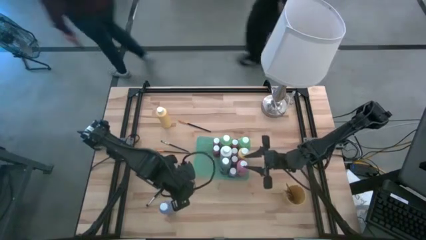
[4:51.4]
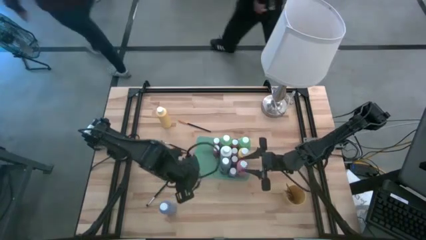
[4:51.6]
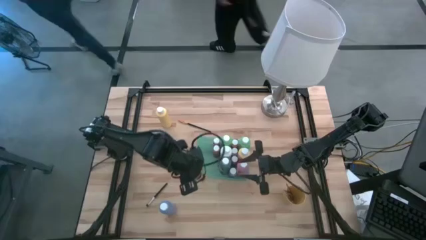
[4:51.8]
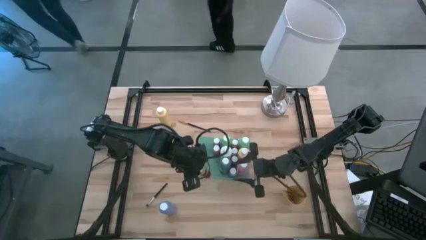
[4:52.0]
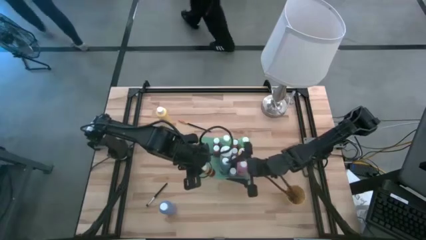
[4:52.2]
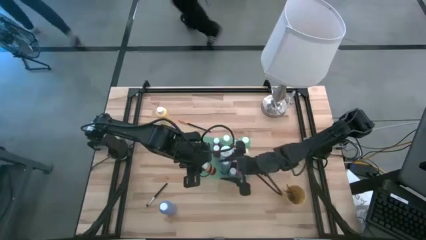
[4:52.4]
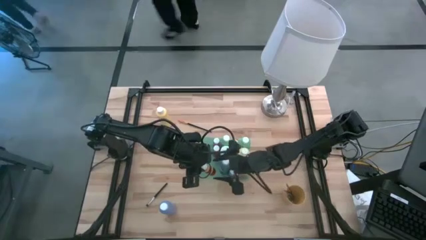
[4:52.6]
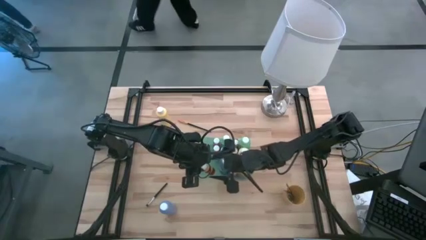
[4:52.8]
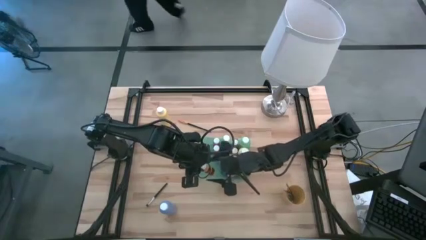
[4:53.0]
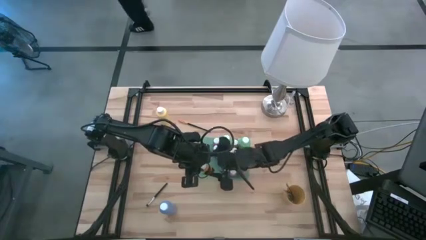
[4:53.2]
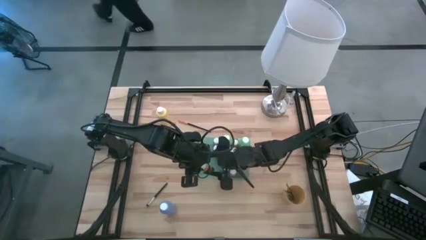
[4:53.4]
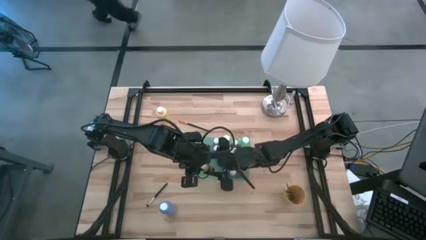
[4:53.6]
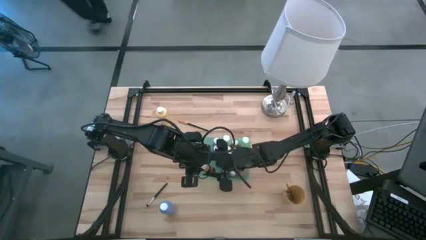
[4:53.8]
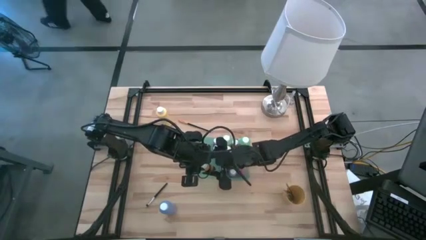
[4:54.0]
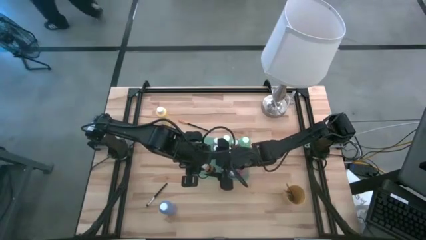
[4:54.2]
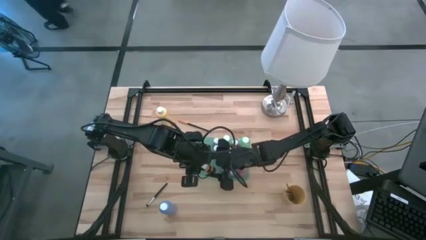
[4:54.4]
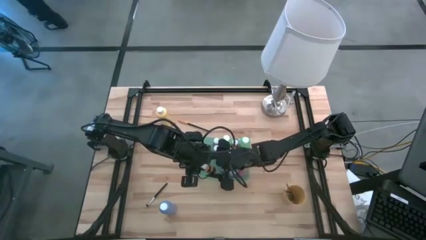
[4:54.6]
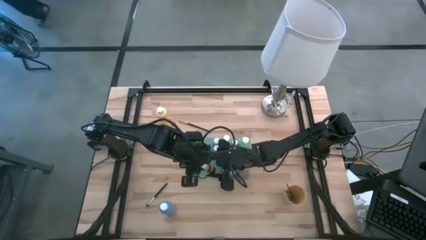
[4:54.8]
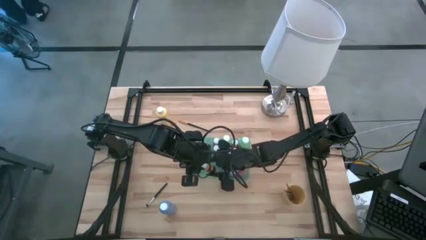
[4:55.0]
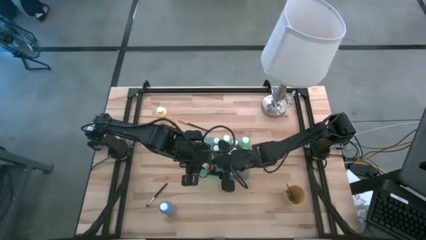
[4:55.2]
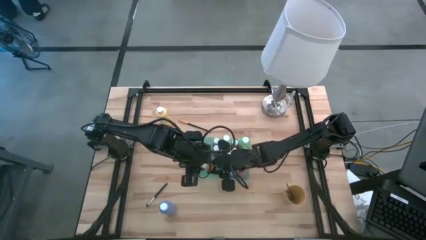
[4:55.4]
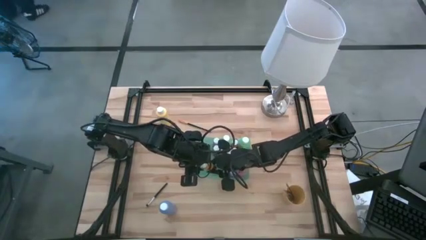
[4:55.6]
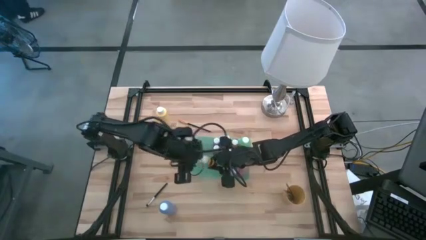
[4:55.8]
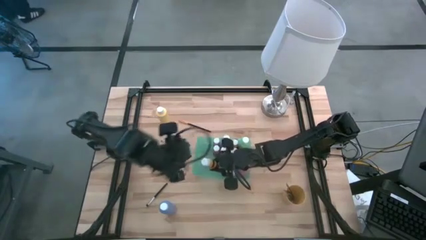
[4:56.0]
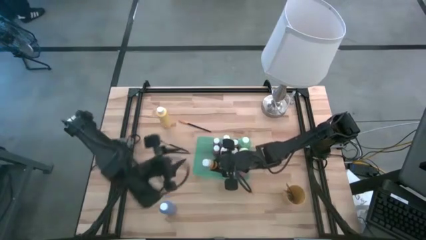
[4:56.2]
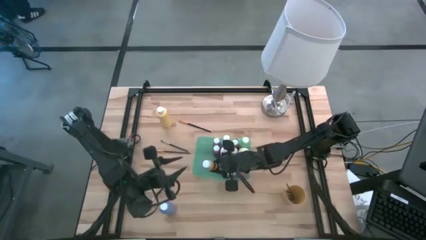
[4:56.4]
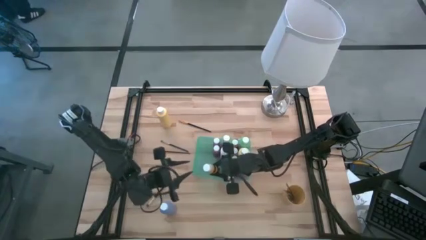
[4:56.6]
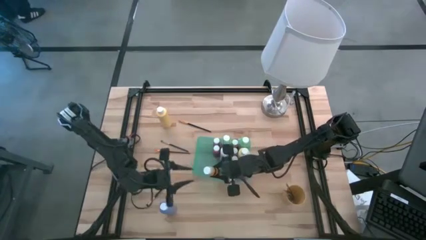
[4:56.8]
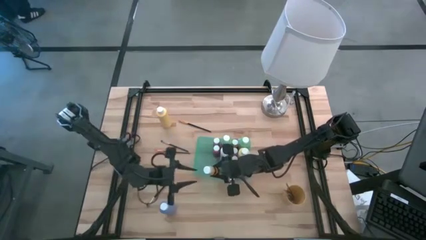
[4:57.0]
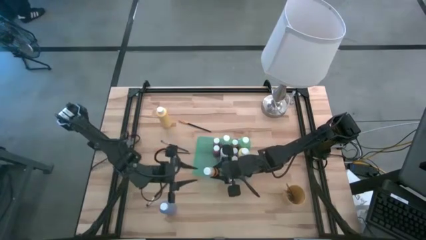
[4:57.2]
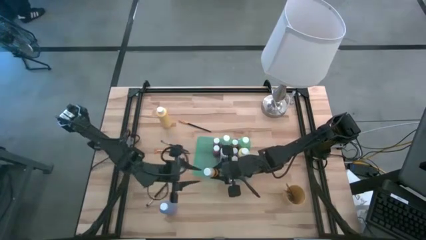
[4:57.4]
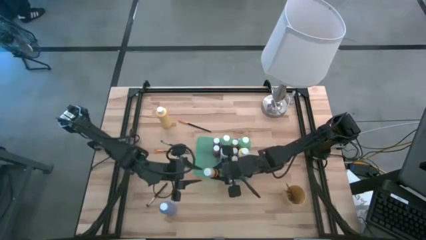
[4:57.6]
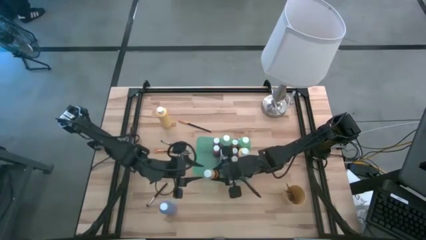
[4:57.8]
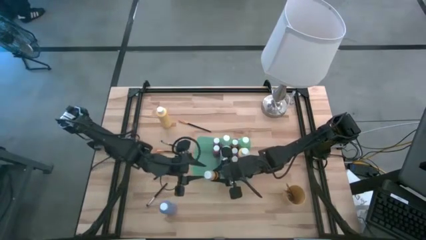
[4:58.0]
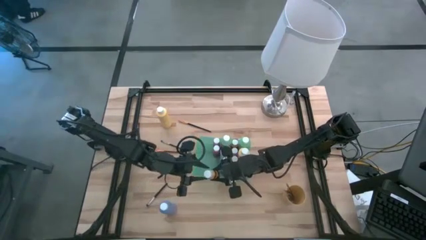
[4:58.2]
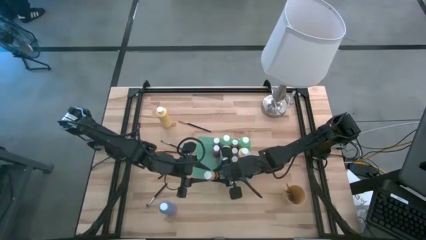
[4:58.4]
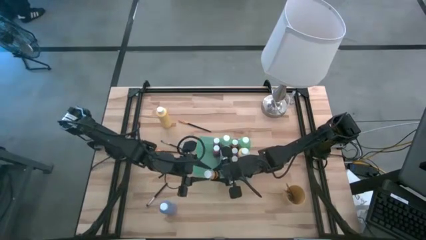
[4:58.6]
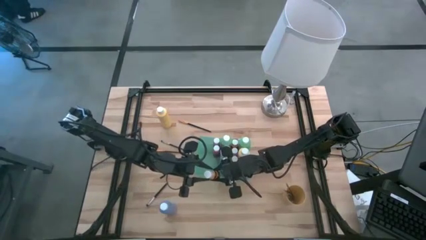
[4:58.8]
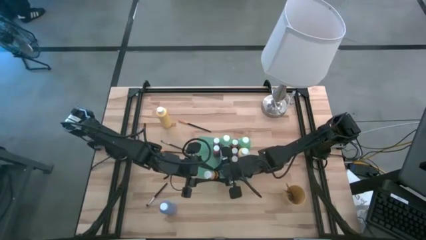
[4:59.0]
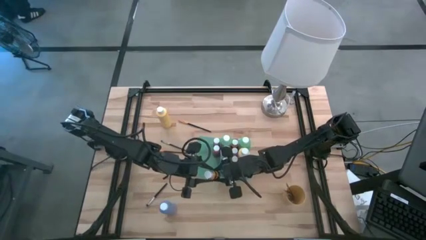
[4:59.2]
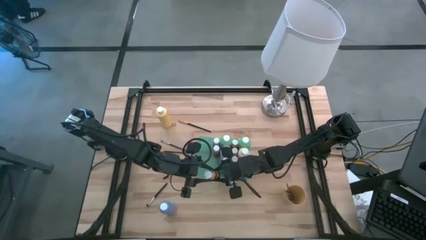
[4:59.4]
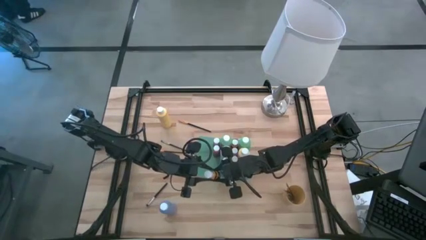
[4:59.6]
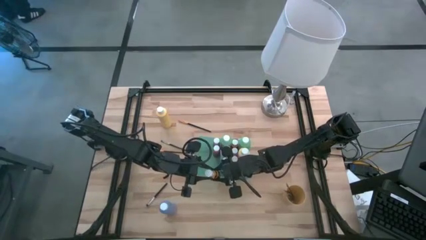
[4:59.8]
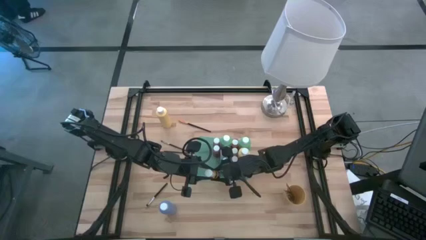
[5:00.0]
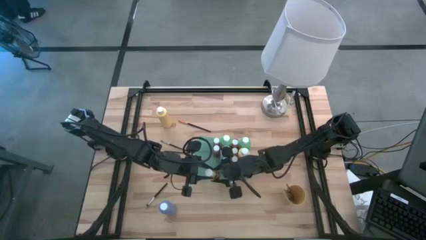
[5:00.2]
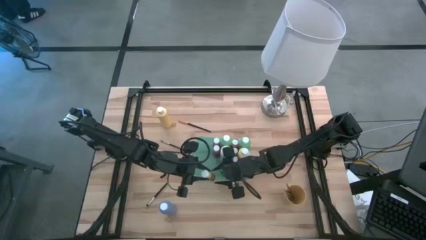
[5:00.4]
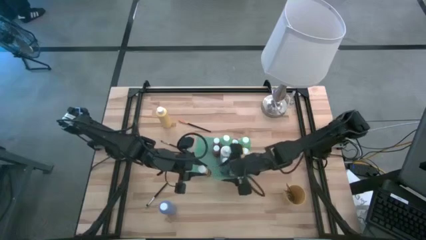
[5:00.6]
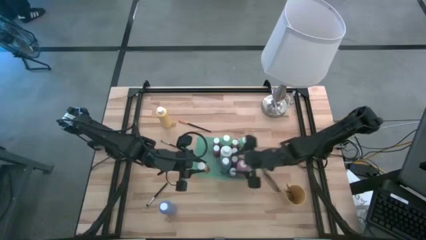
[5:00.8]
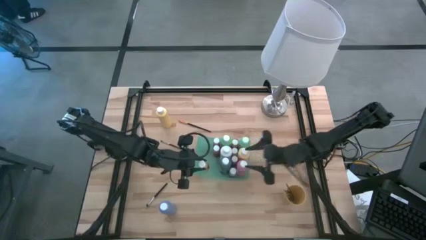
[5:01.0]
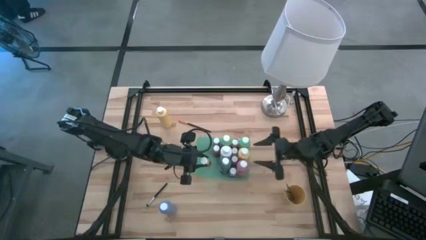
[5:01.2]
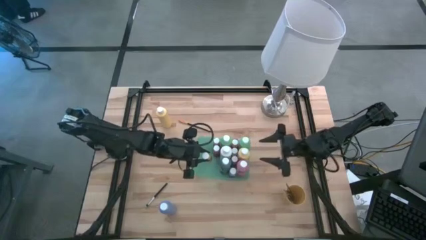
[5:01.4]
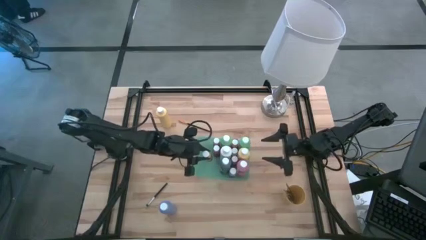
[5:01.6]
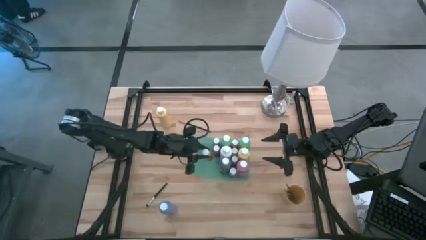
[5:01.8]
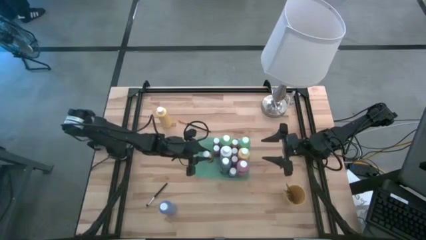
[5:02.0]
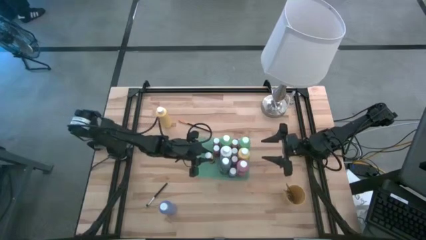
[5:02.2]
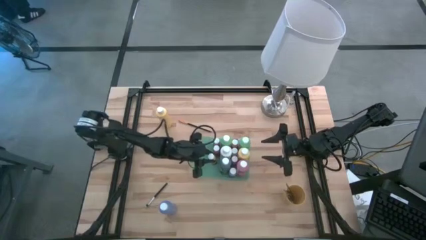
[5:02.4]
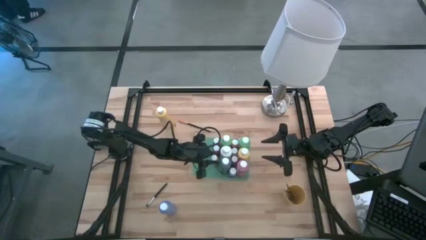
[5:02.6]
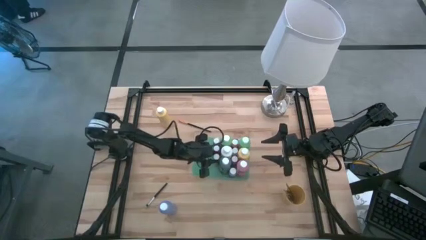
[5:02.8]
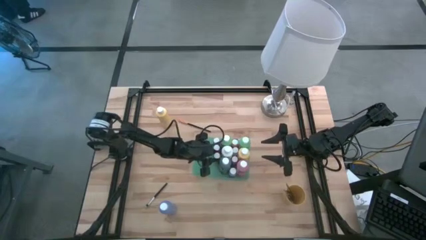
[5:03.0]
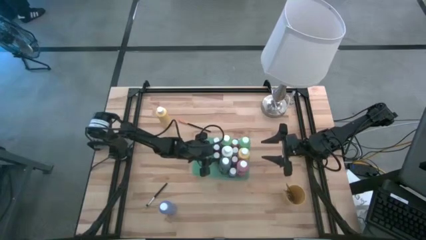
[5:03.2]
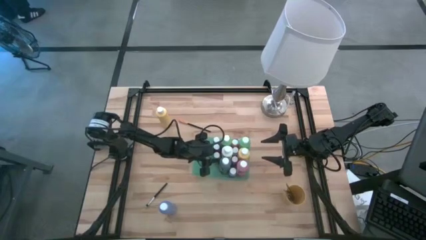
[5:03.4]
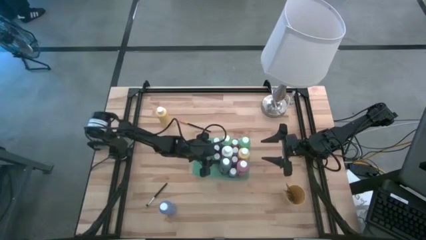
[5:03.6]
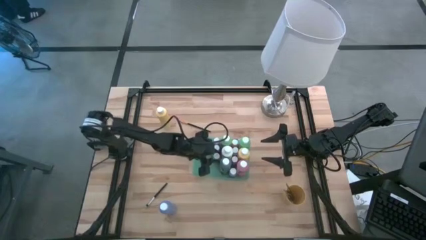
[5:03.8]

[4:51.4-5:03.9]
Task: Pick & Place Paint Supplies
Put the dark yellow paint bottle into the green bin
